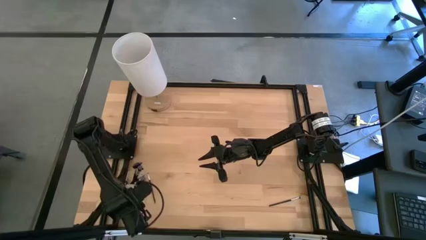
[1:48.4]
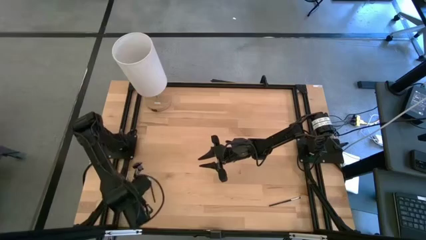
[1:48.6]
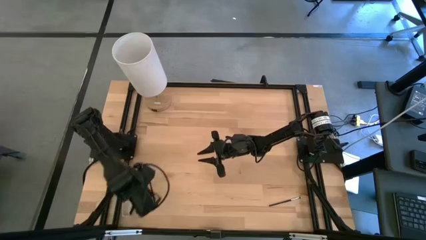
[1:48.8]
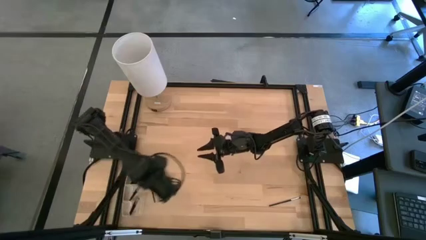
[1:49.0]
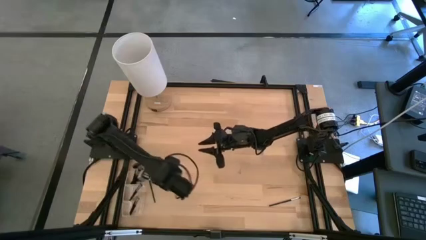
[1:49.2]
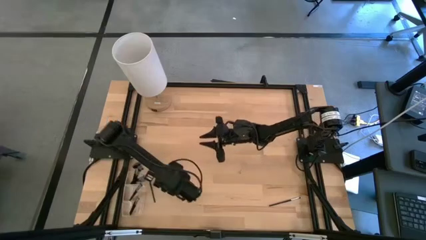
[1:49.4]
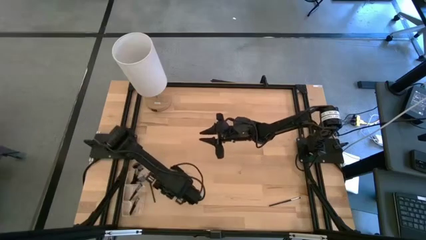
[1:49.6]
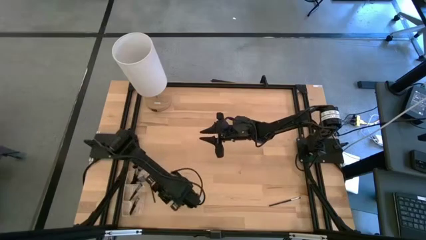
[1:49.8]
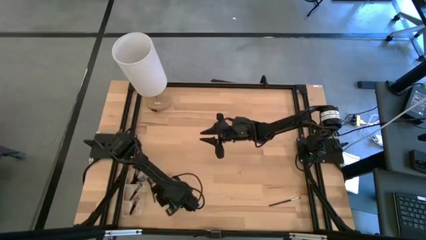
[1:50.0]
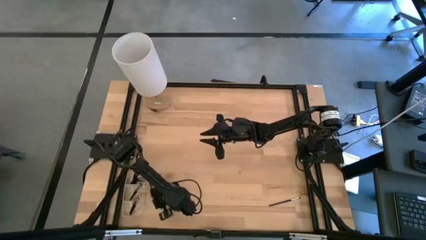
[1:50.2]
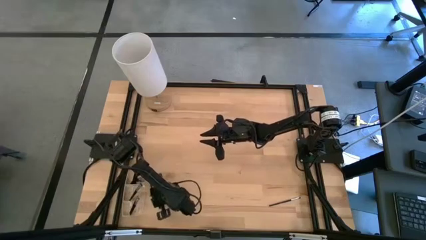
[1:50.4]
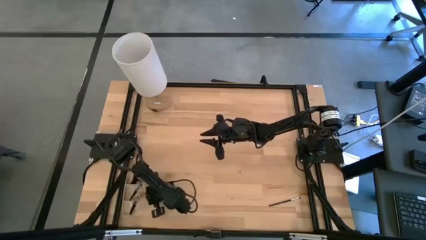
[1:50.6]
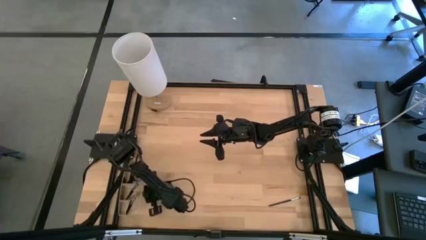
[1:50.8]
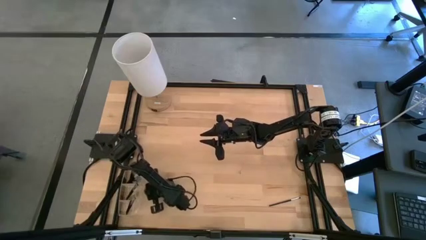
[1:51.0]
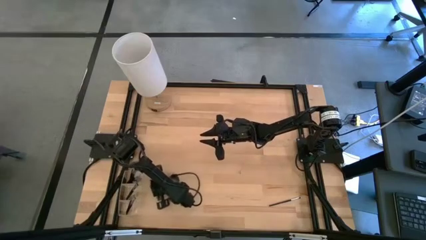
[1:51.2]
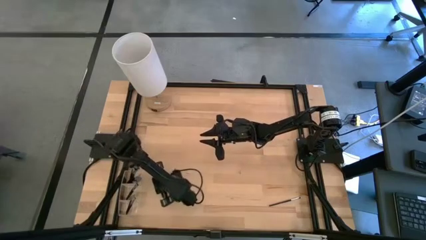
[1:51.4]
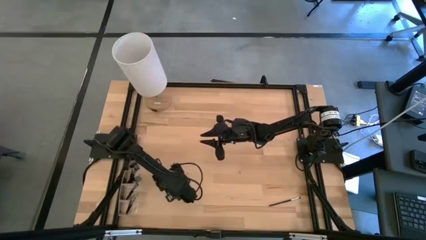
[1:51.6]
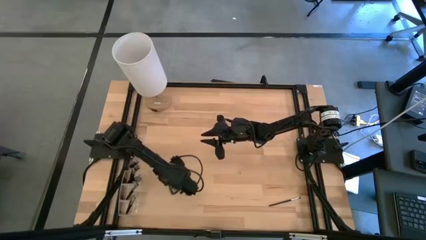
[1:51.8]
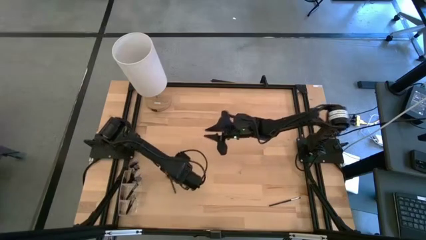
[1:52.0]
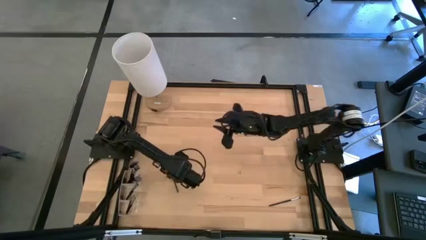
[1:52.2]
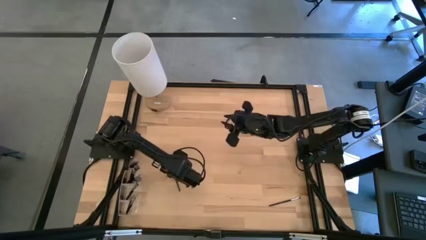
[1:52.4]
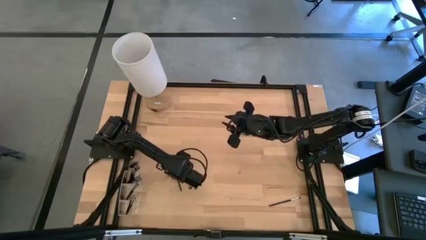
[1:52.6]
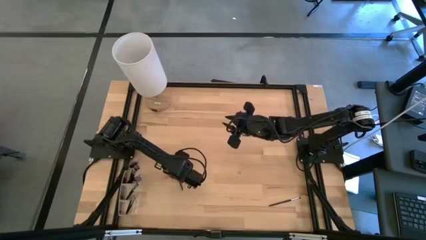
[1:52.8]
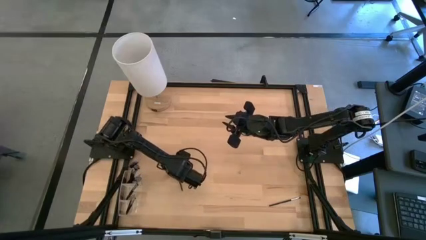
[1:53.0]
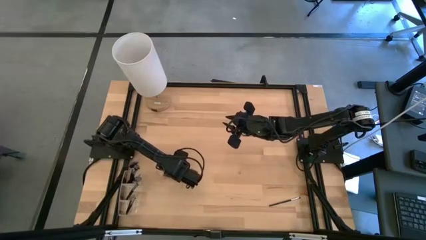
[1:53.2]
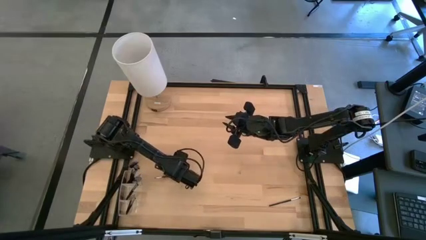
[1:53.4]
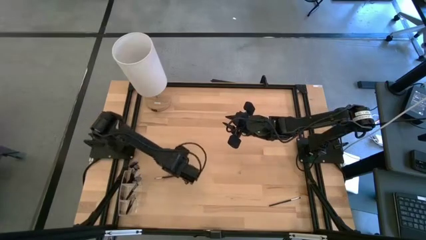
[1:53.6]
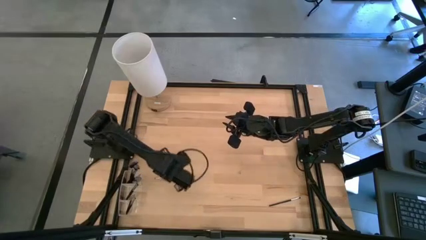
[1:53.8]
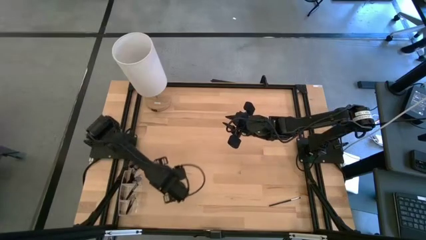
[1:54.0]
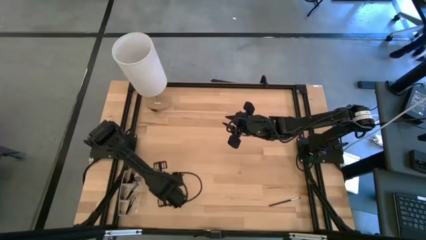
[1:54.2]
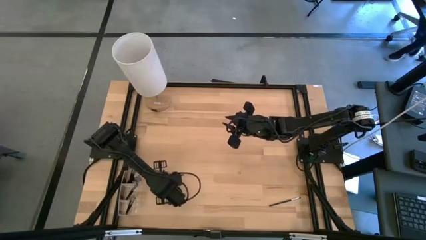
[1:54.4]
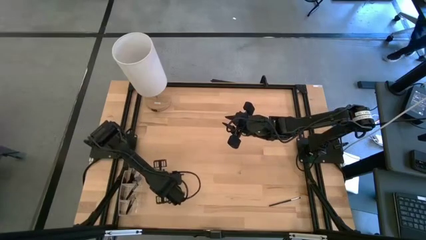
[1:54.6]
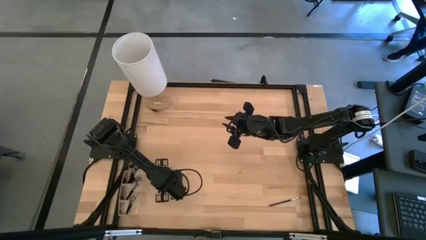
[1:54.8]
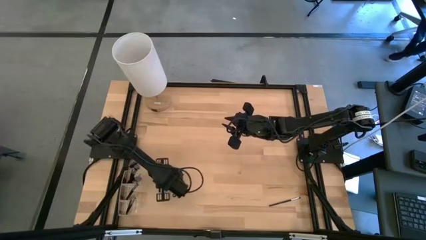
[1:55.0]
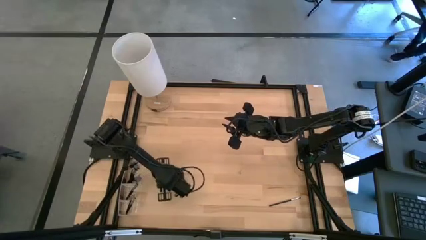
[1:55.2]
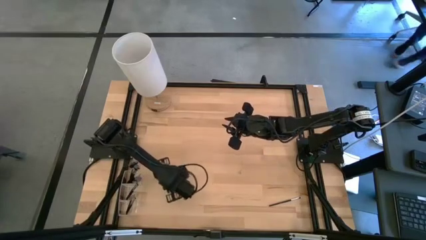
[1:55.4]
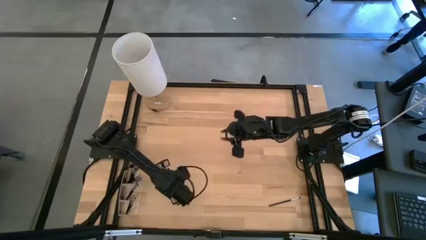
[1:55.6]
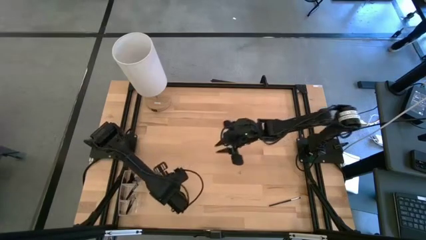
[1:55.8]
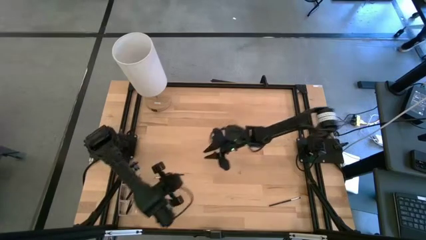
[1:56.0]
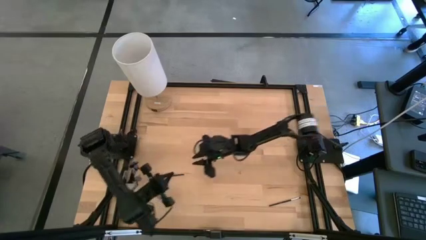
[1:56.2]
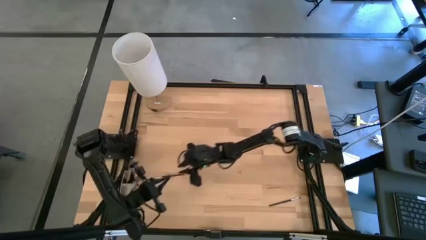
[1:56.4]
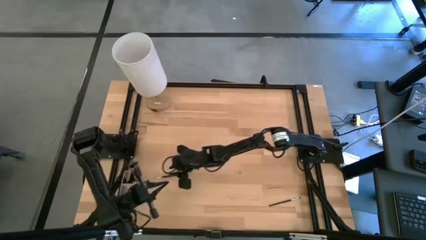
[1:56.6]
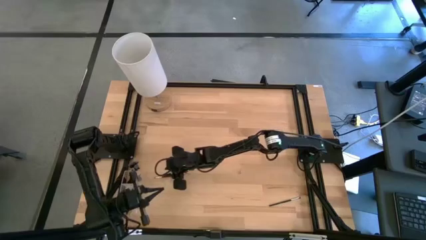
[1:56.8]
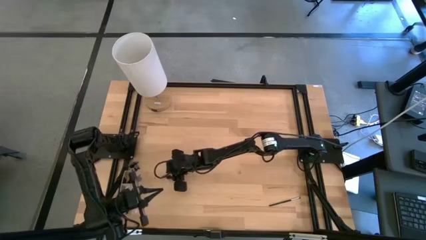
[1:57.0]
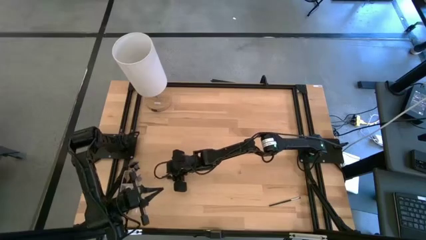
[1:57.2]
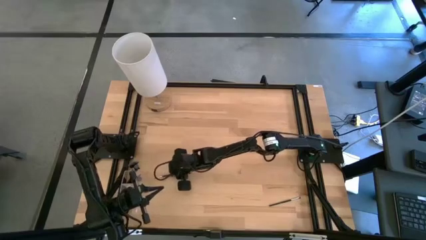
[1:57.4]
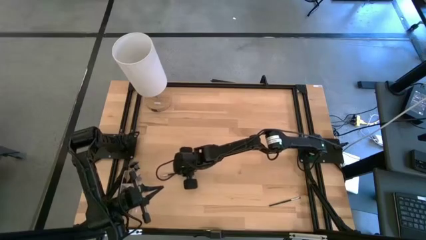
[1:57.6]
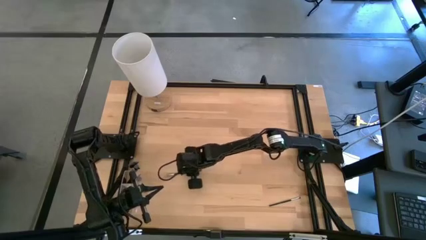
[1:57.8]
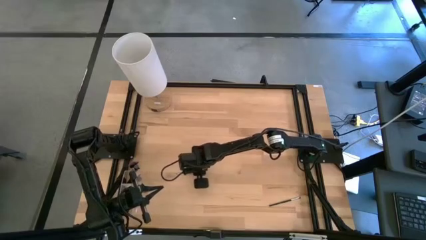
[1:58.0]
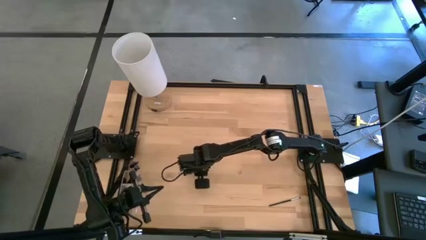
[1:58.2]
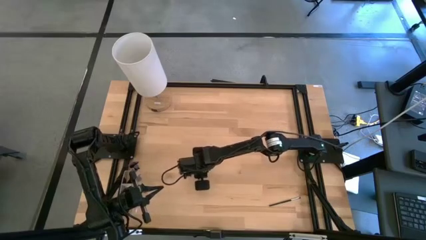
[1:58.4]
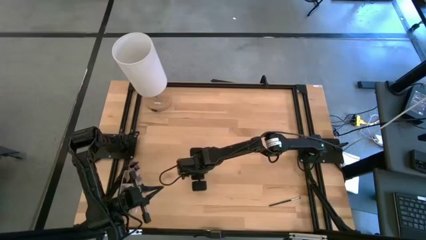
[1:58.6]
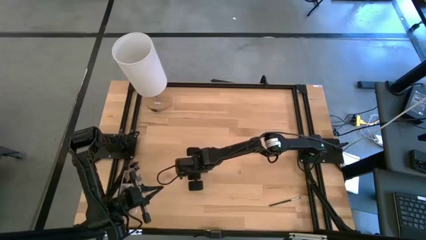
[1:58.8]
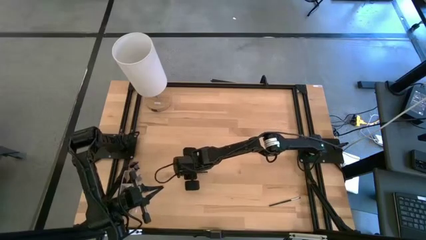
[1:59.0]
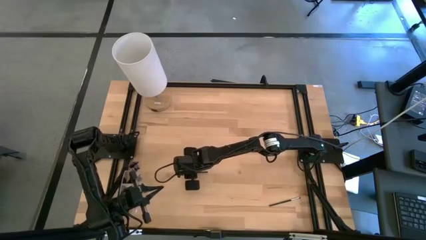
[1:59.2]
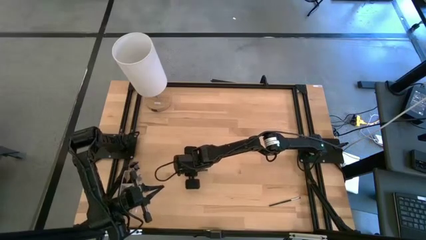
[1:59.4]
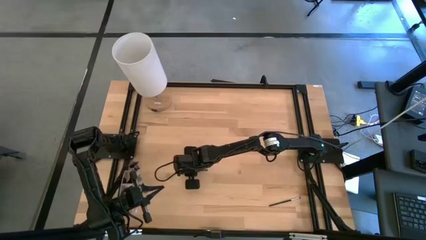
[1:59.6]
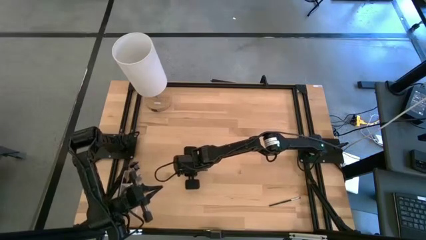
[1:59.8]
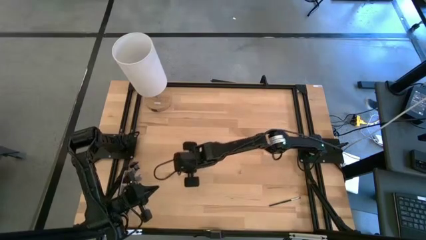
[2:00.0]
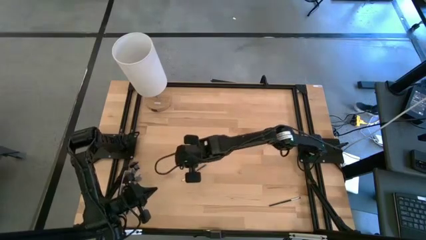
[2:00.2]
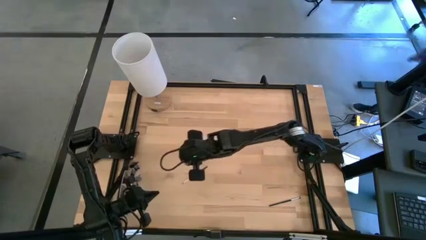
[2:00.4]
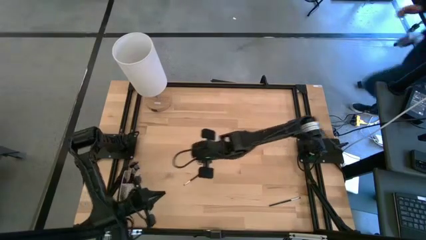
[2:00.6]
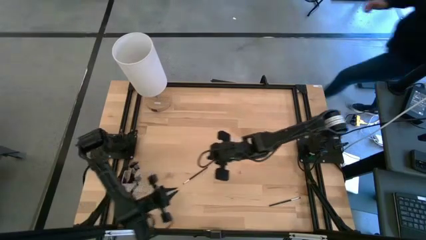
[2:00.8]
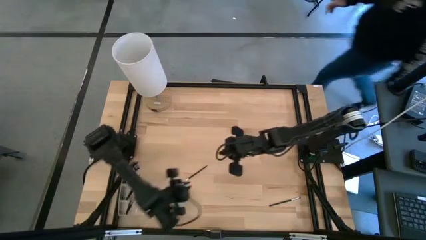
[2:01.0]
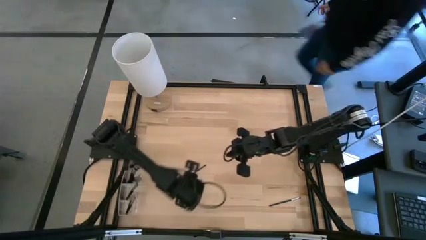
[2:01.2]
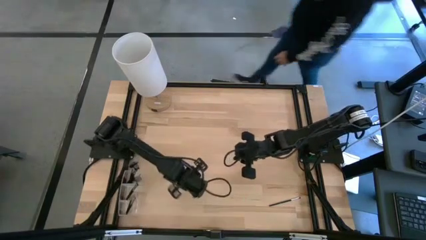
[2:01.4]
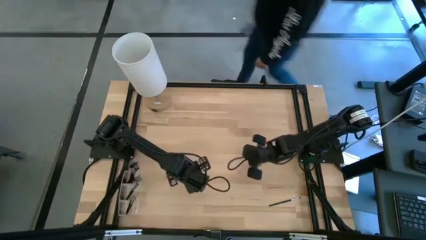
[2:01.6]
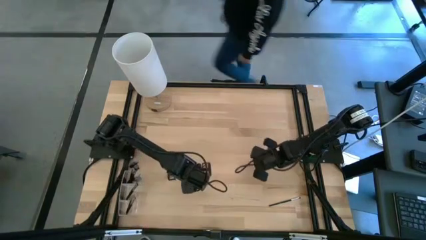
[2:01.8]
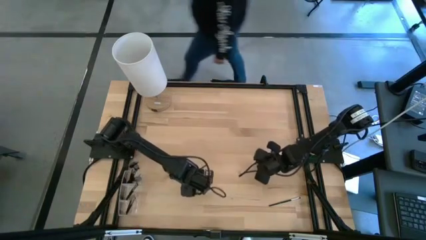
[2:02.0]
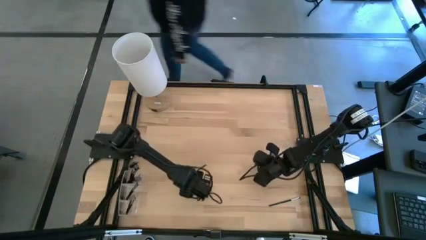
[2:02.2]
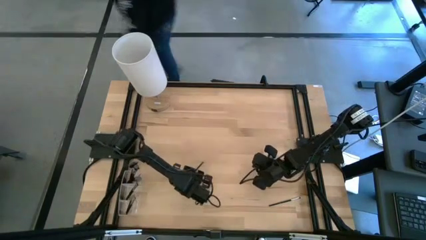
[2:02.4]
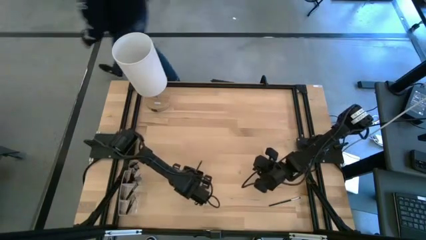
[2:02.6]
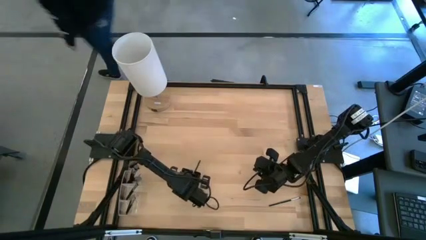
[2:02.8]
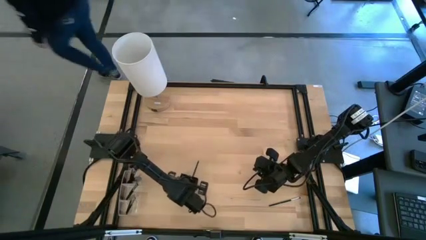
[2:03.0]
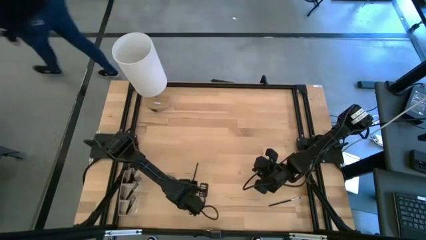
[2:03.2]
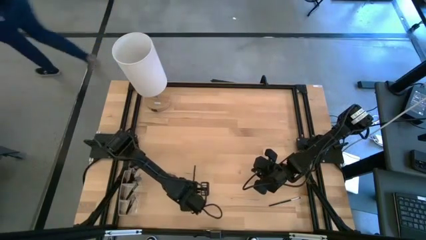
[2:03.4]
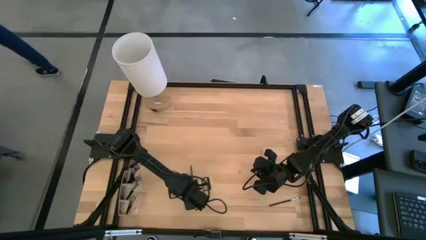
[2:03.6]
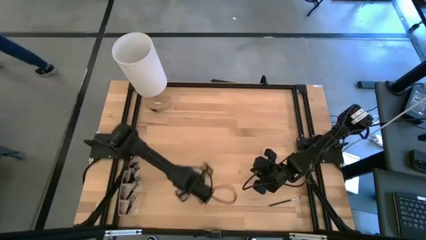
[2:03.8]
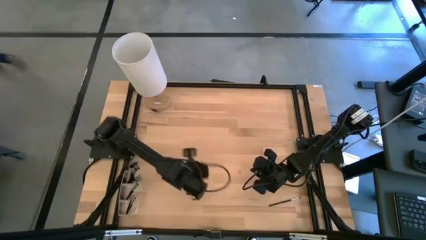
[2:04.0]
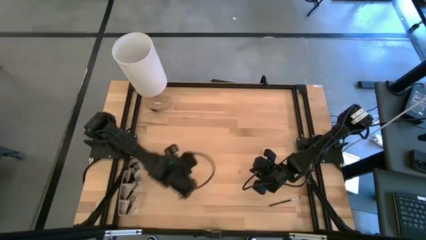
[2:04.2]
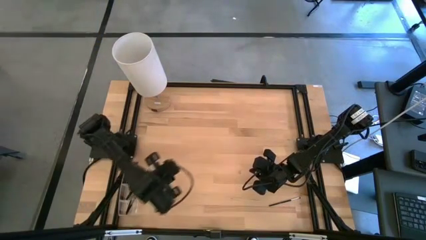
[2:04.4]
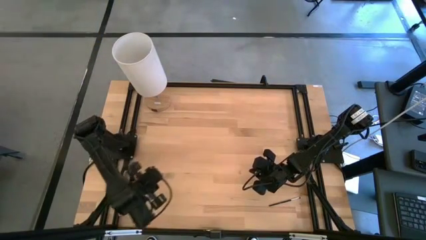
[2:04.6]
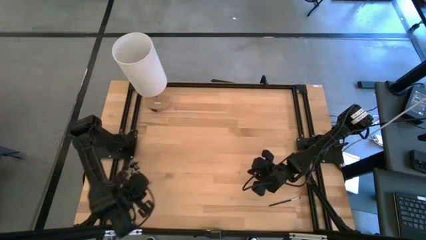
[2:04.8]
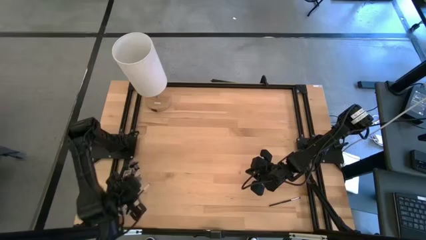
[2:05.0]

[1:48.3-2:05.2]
Task: Pick & Place Makeup Supplies
Put the left makeup brush into the transparent organizer
